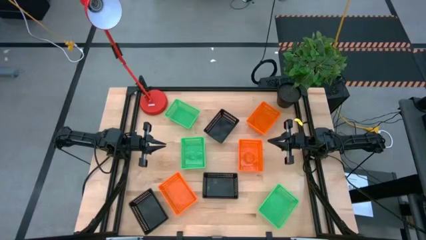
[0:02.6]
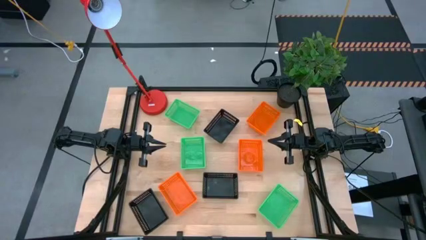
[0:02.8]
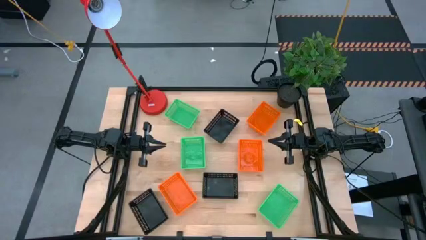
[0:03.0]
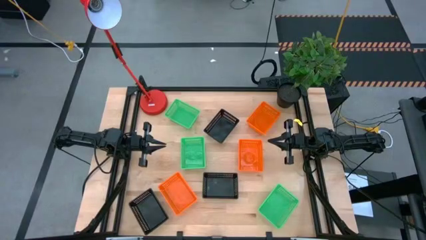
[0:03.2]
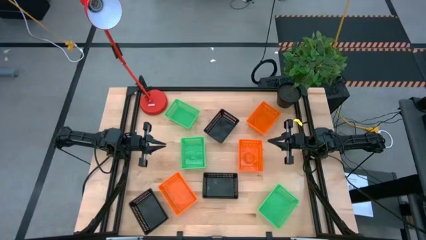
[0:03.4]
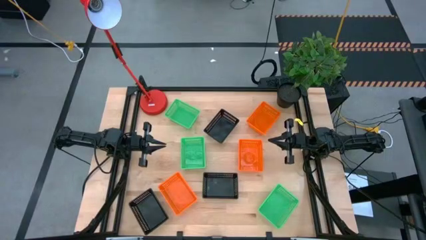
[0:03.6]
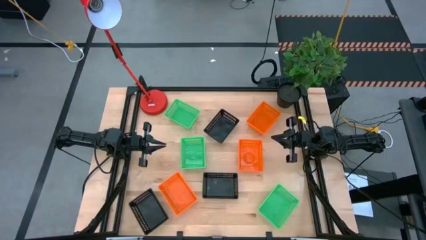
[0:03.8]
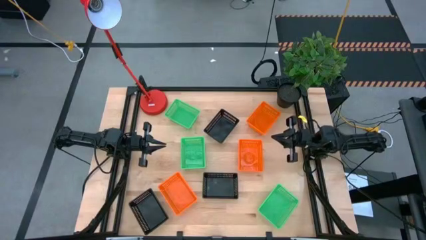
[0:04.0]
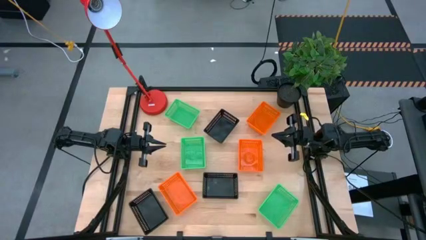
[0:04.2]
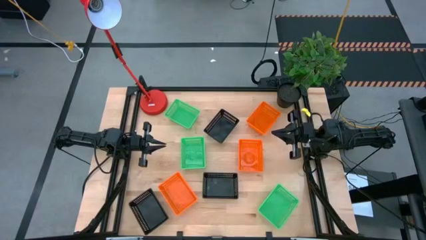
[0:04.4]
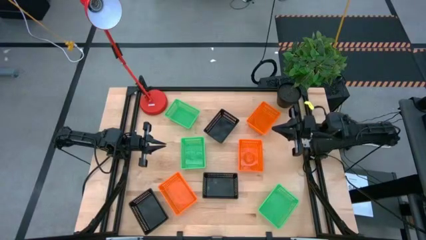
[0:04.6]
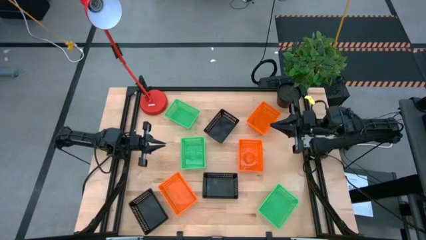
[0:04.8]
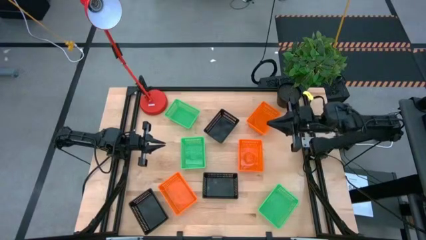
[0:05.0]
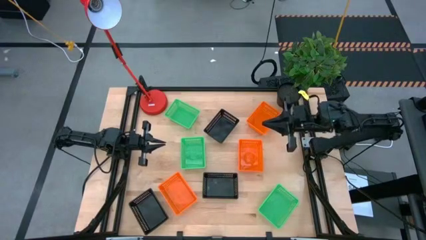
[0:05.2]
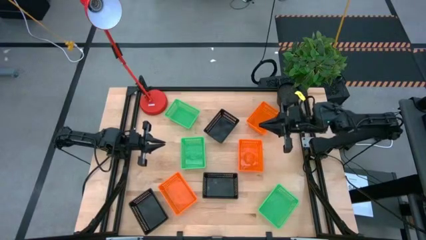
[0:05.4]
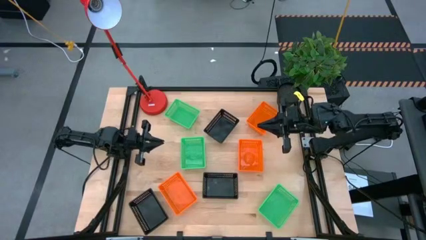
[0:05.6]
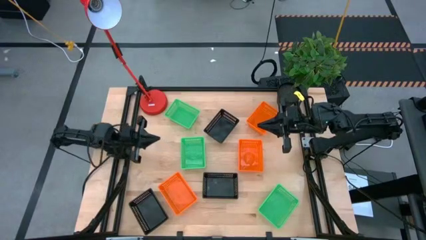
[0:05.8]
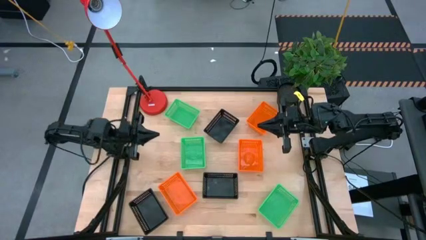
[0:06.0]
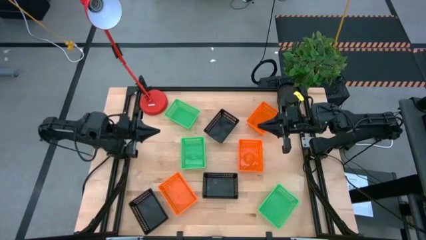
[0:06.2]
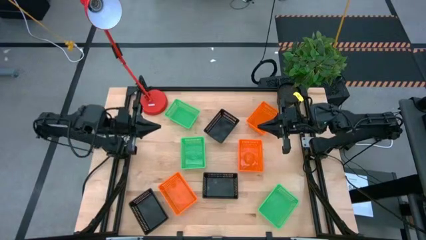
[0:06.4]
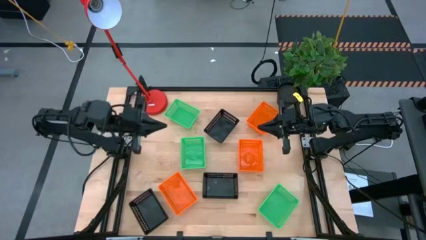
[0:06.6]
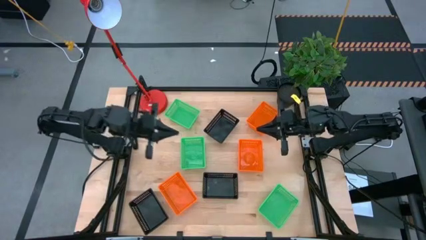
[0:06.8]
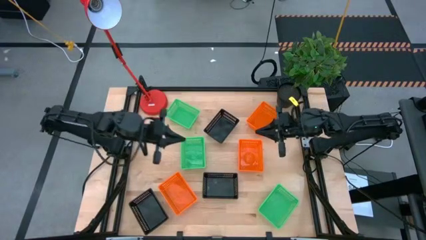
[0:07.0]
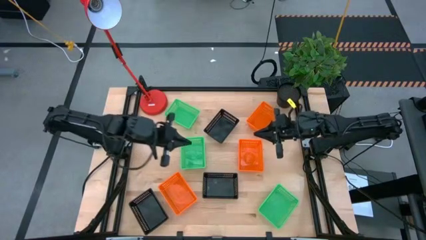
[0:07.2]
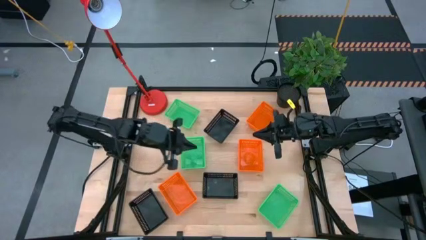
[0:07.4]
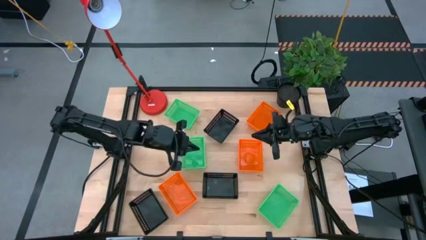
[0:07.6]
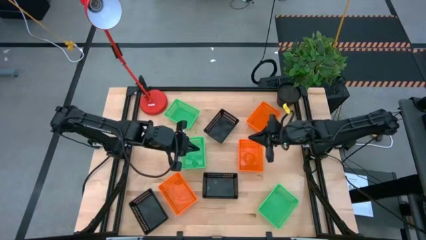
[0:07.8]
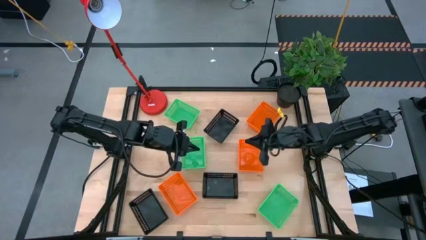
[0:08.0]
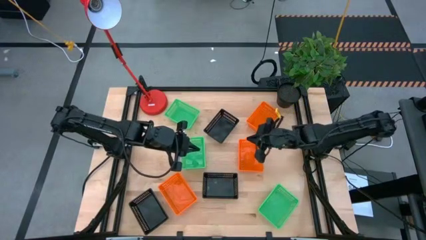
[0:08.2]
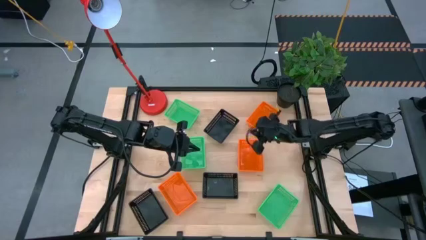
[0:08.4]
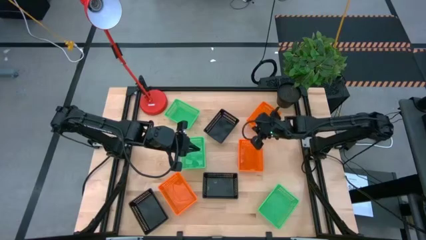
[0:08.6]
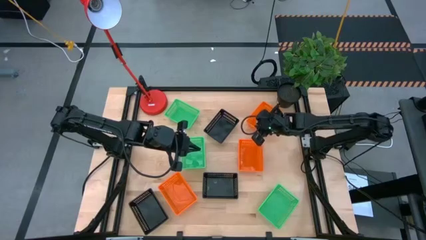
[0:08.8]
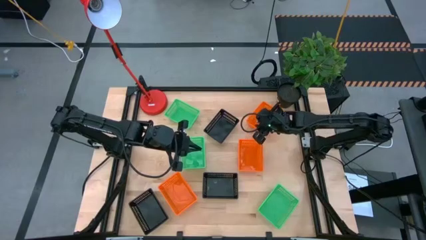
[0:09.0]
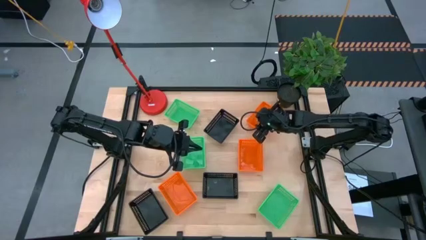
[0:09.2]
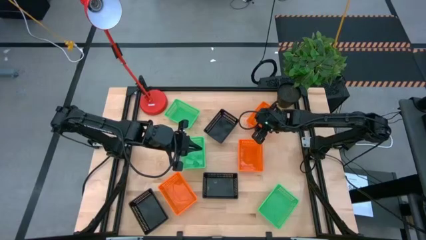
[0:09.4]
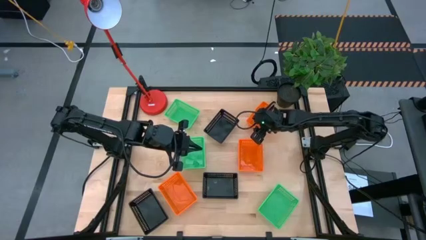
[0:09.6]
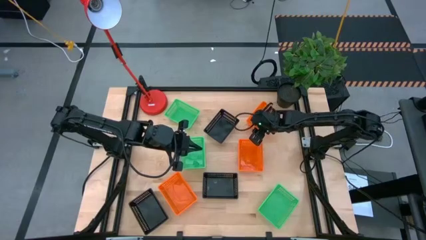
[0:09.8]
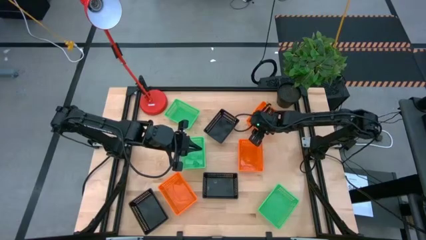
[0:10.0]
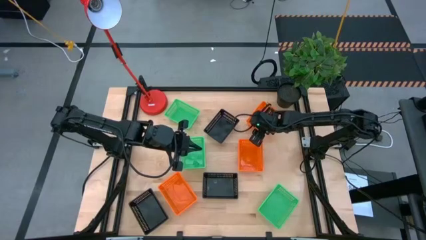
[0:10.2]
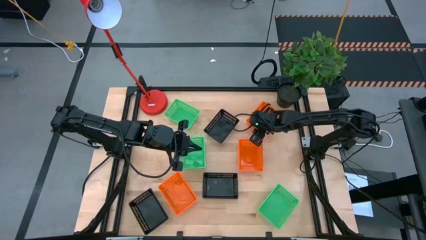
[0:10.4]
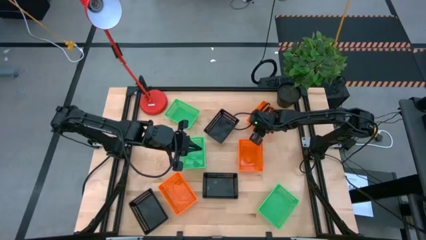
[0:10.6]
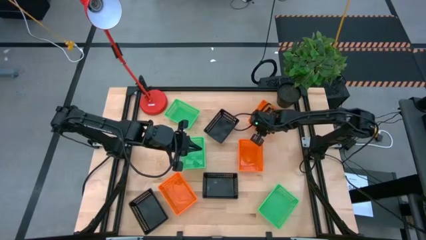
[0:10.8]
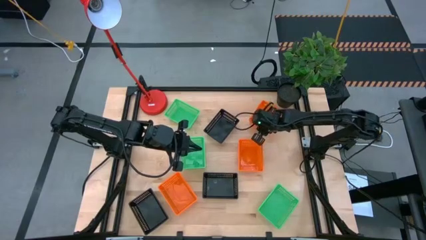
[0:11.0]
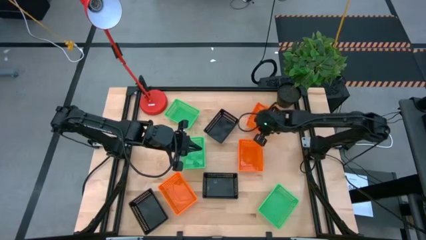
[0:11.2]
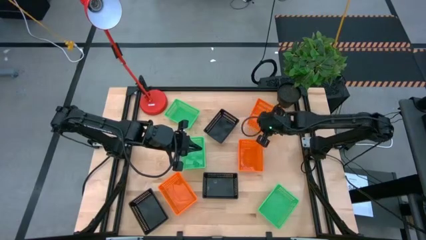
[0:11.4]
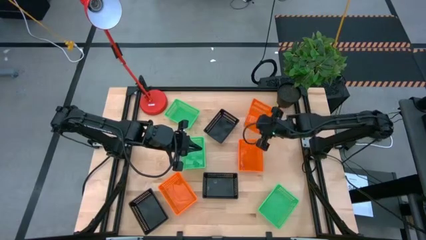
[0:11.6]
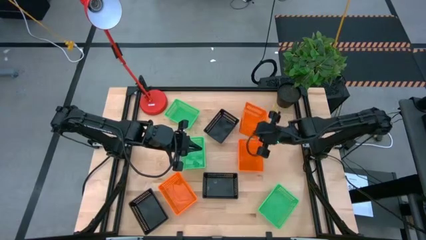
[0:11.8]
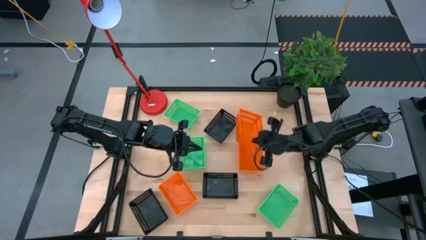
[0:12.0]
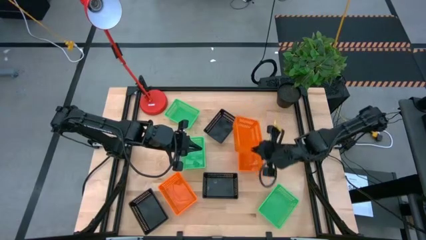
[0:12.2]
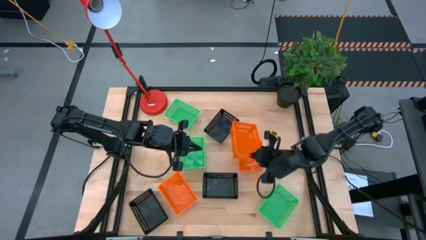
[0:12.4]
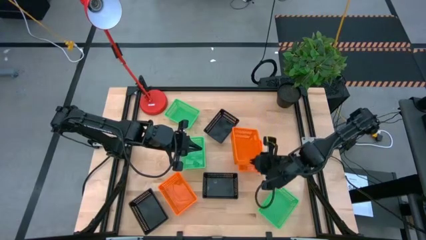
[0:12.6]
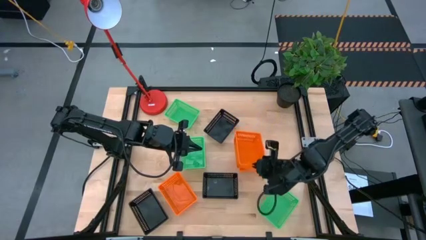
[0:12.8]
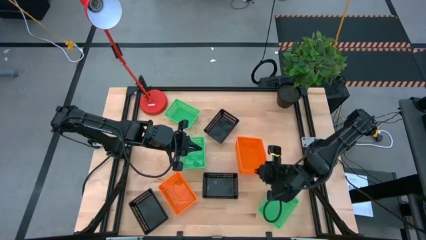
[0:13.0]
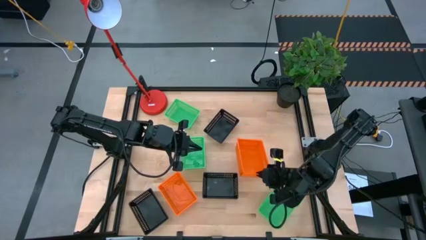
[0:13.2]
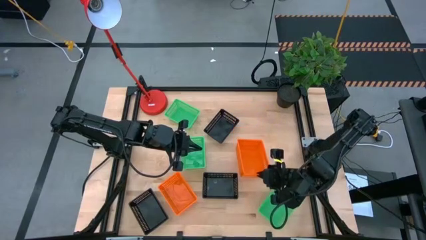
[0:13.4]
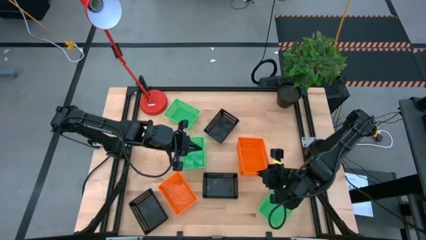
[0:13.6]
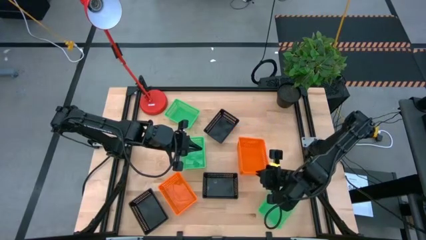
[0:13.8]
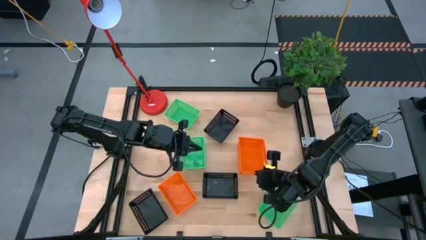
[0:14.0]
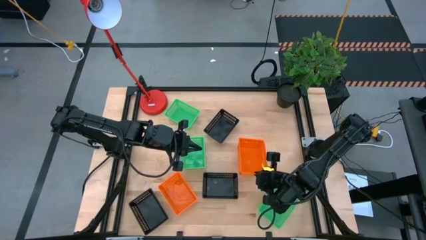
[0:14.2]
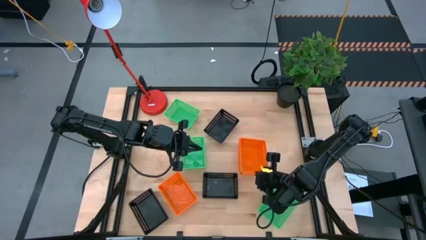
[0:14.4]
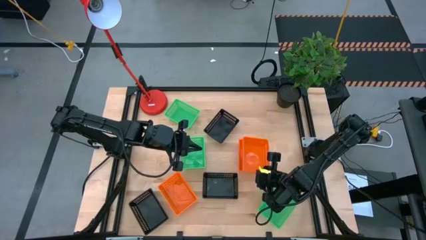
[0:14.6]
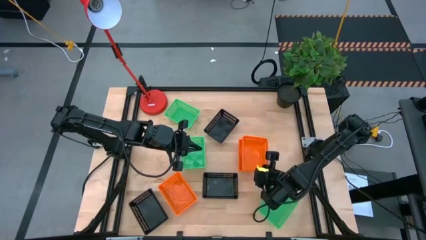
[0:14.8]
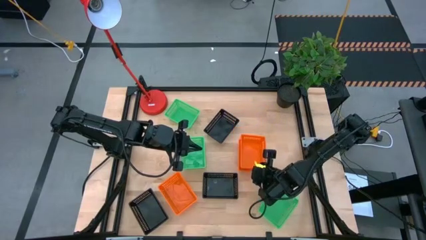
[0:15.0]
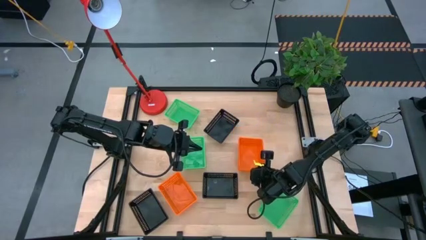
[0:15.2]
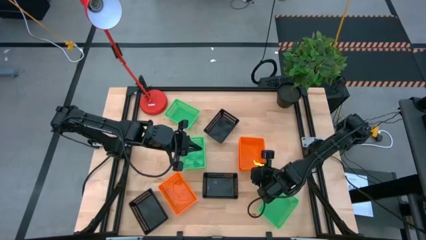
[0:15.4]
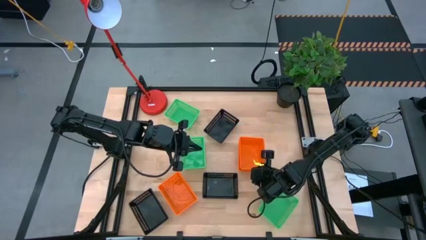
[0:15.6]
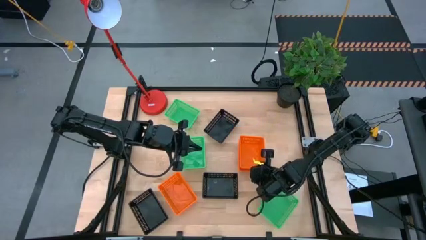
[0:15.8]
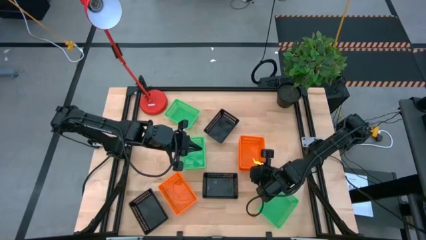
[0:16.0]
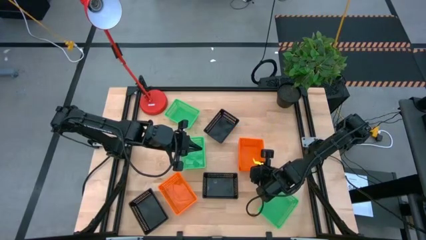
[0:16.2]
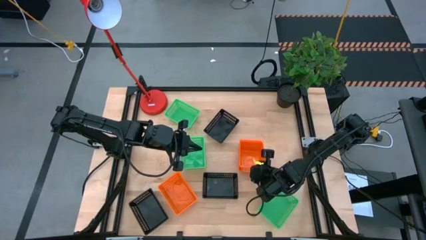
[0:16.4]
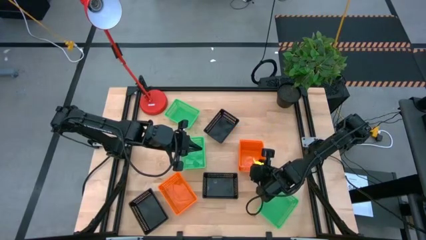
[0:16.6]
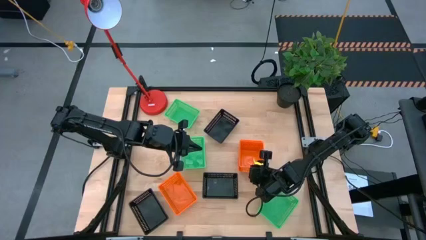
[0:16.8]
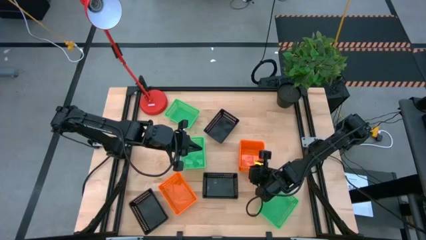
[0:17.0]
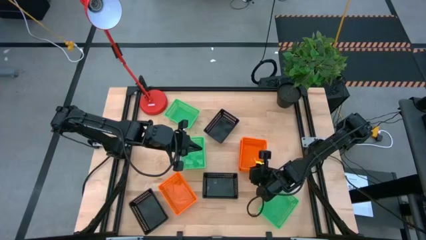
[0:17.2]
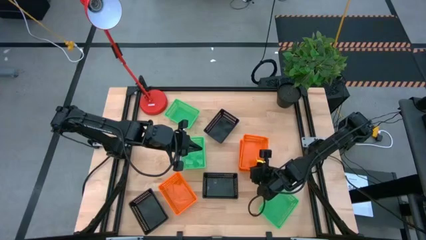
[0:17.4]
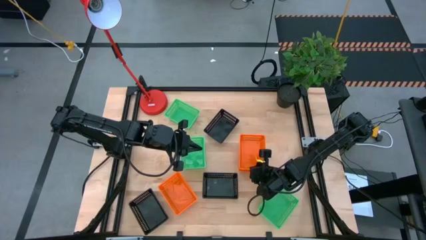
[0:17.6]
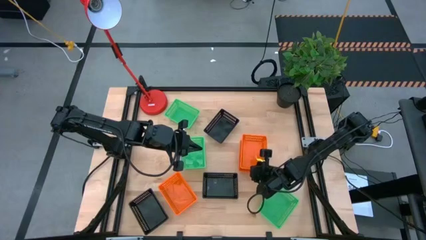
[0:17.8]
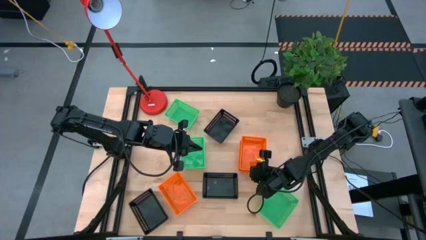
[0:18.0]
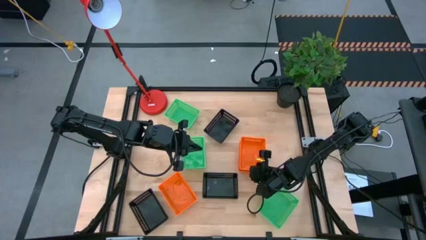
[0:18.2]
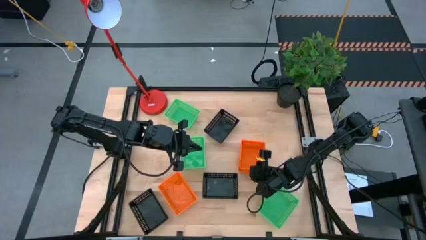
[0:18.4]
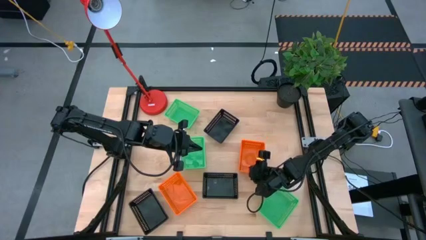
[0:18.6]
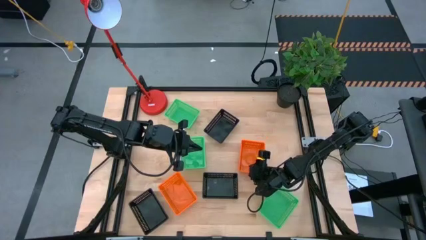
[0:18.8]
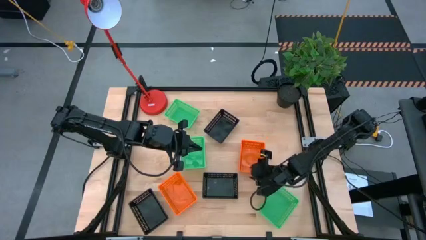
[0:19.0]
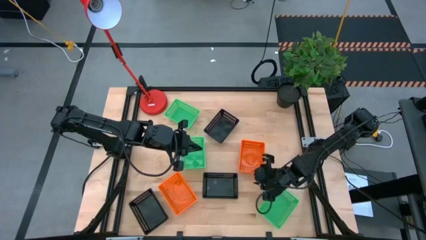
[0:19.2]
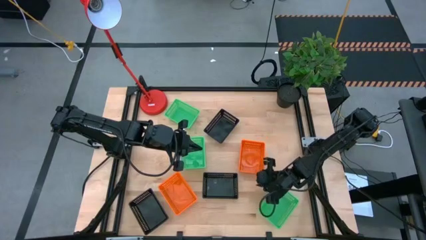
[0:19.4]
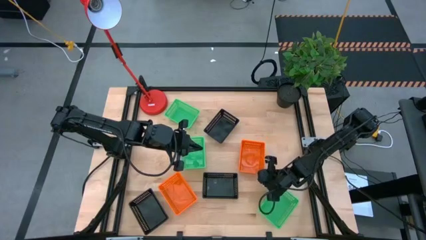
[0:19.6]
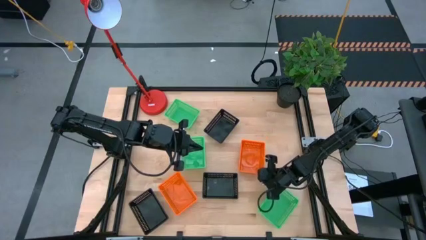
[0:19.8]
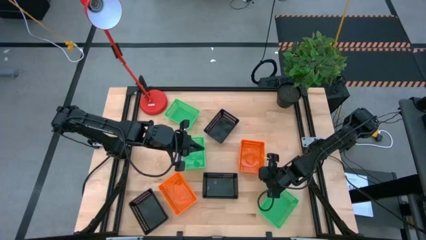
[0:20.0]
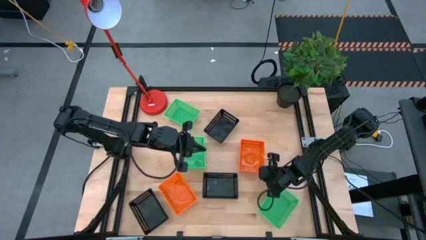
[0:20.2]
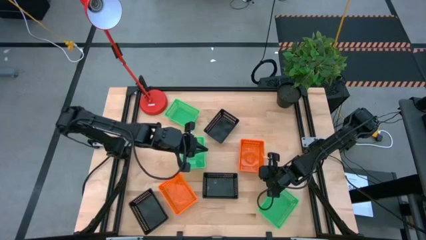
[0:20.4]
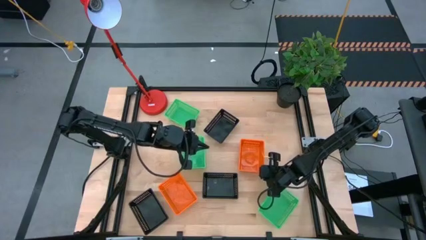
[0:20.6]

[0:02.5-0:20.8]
Stack the top orange bin on top of the middle orange bin
